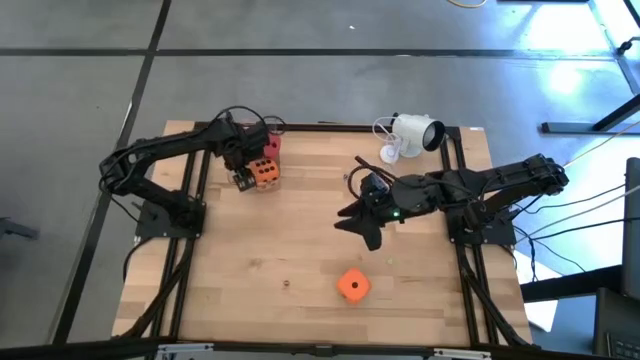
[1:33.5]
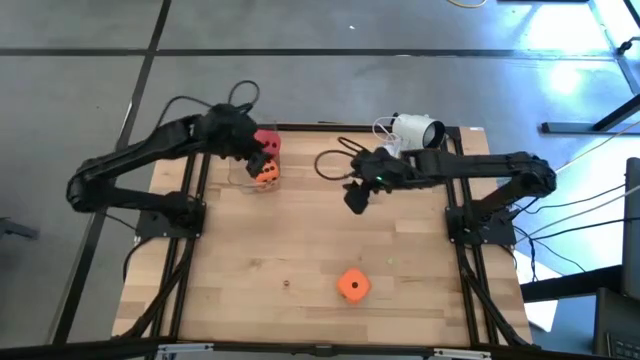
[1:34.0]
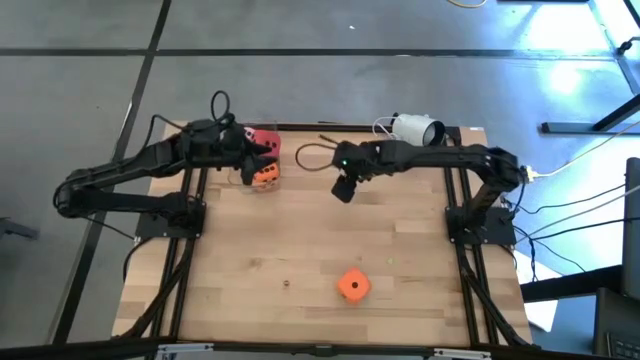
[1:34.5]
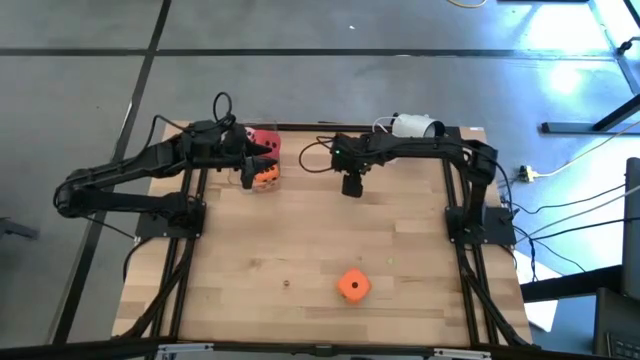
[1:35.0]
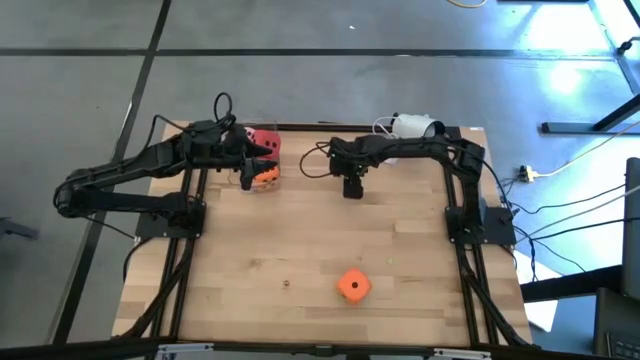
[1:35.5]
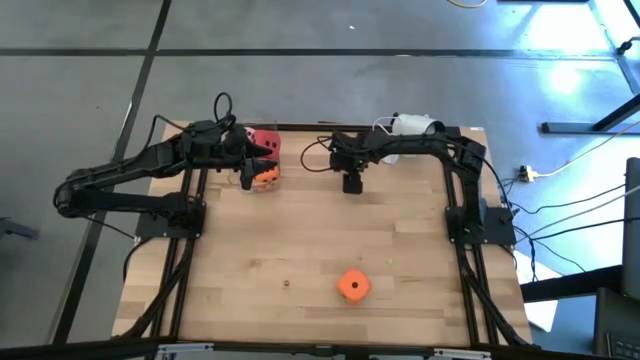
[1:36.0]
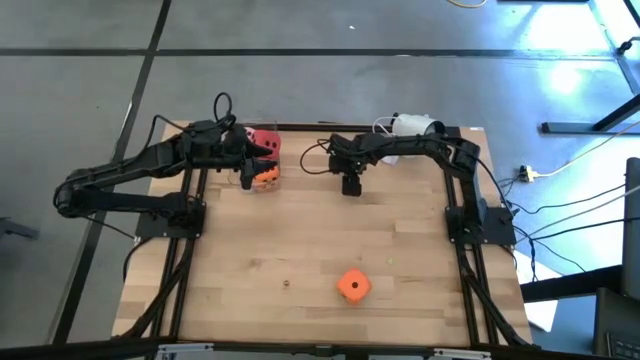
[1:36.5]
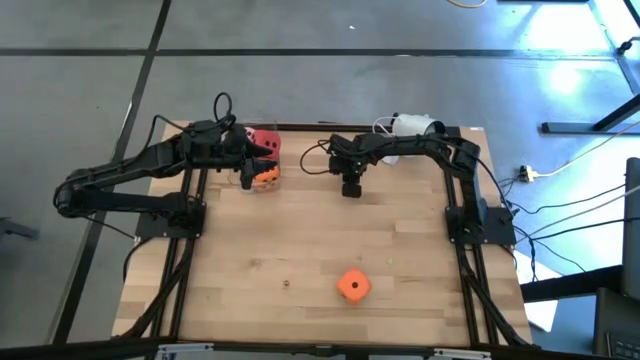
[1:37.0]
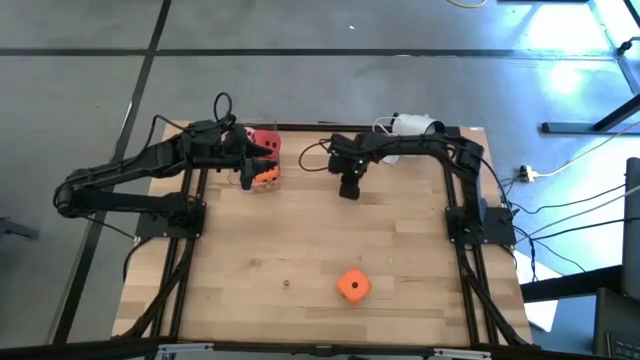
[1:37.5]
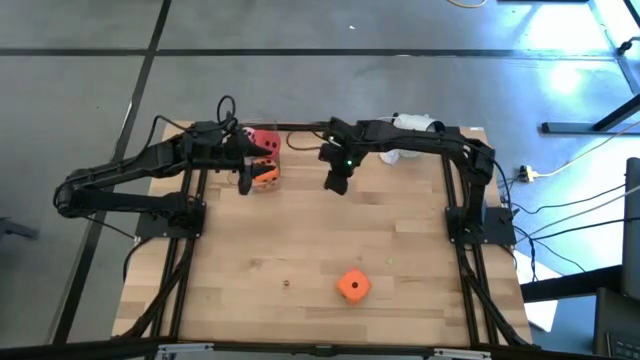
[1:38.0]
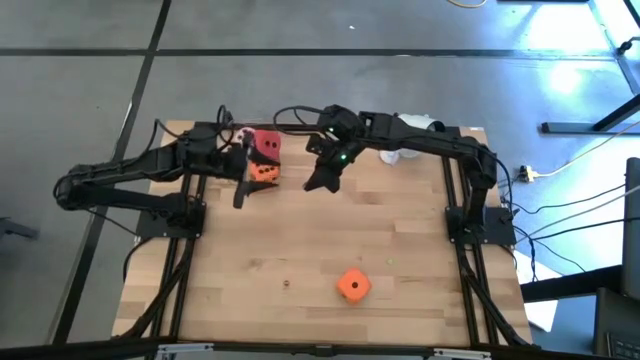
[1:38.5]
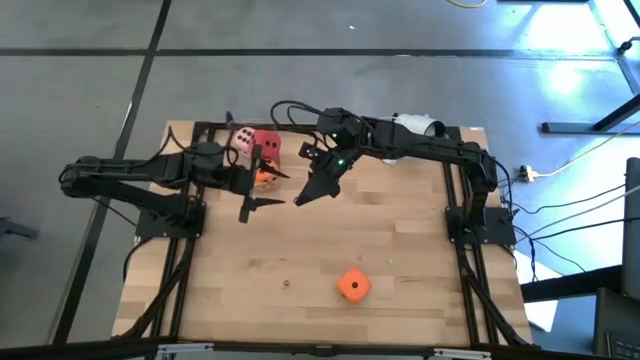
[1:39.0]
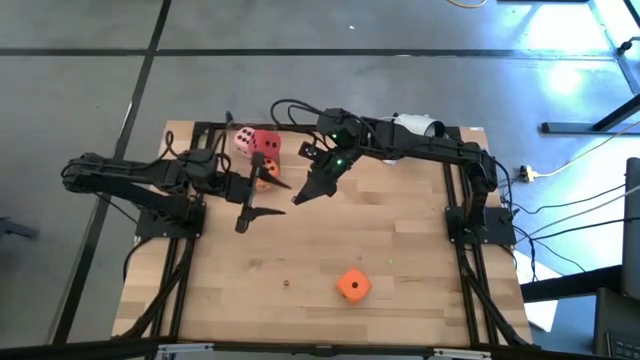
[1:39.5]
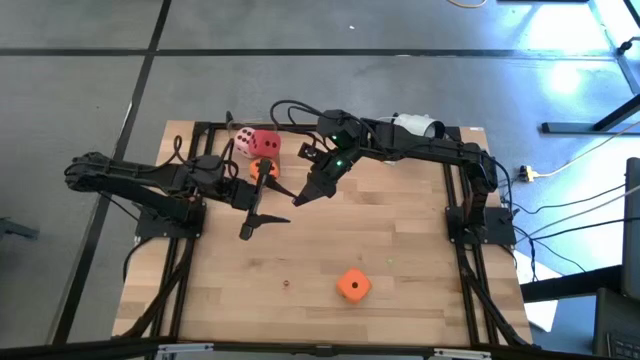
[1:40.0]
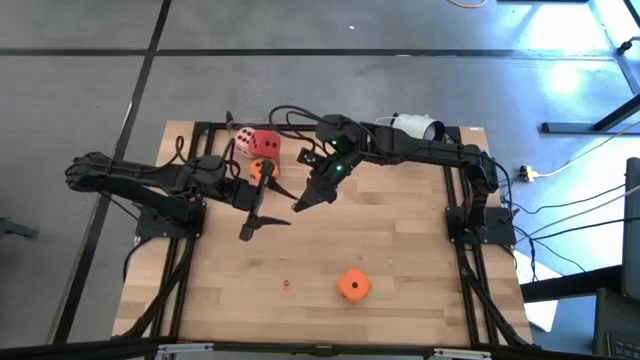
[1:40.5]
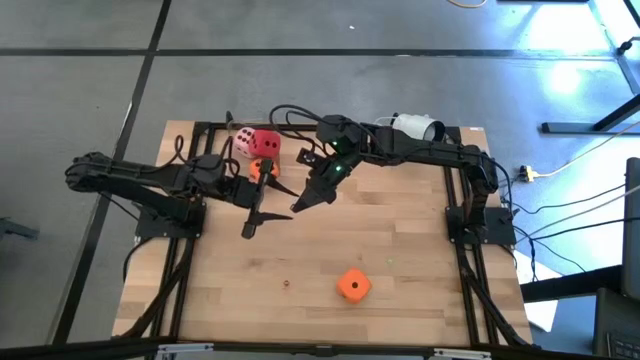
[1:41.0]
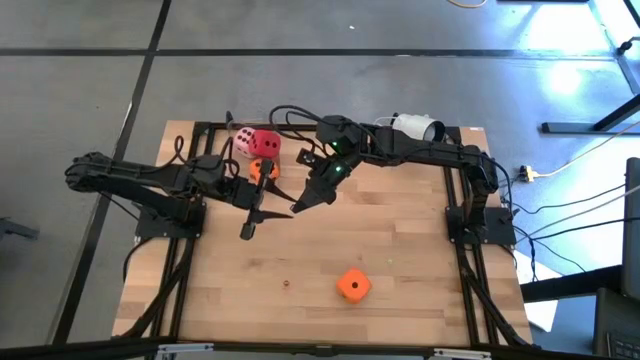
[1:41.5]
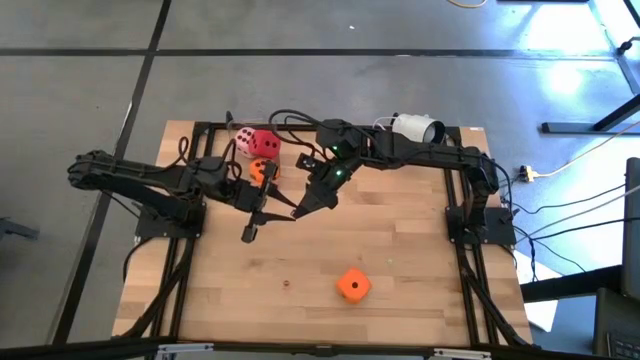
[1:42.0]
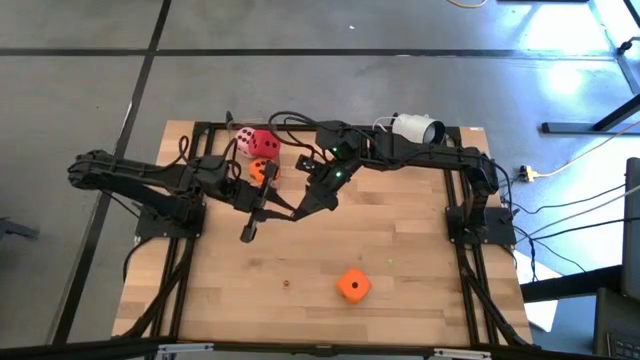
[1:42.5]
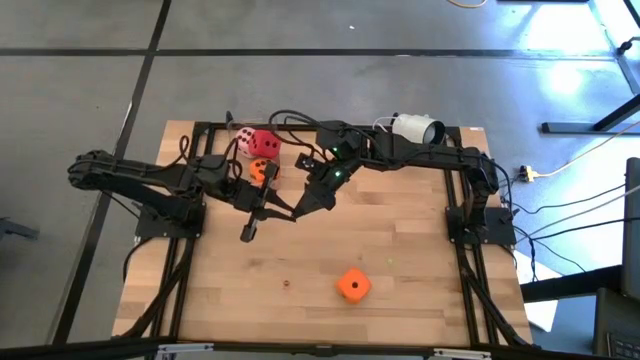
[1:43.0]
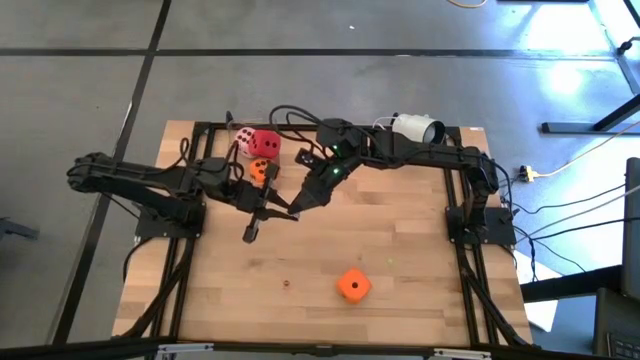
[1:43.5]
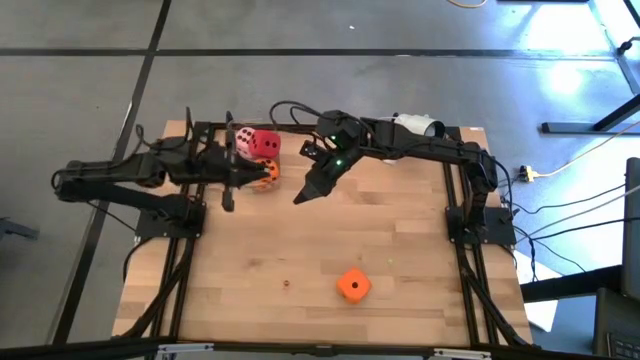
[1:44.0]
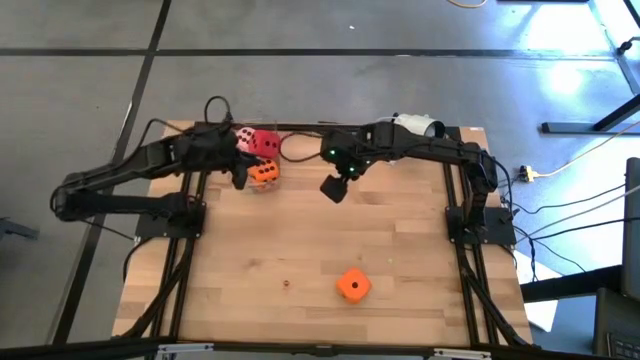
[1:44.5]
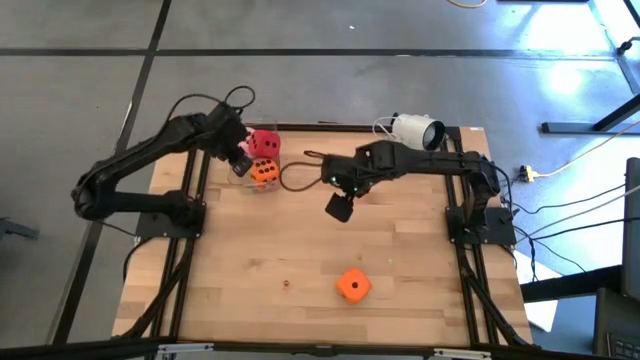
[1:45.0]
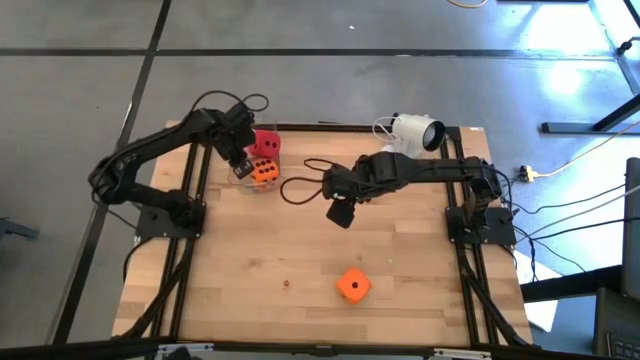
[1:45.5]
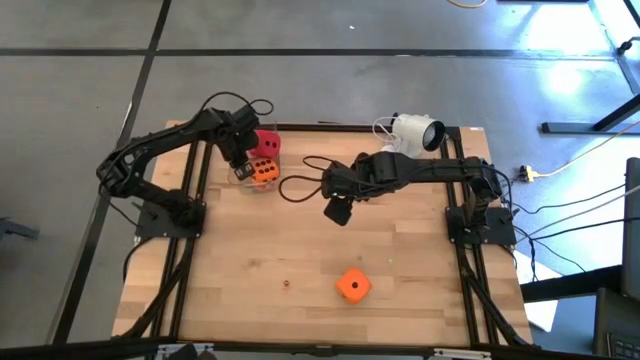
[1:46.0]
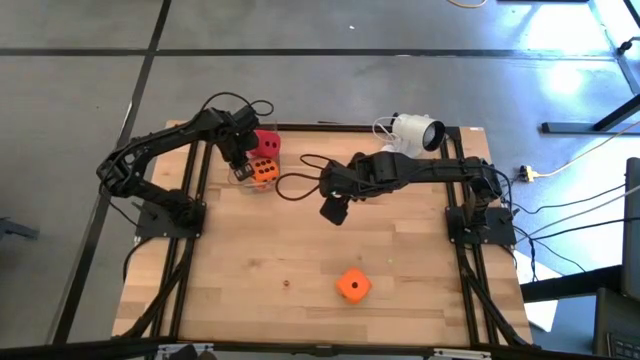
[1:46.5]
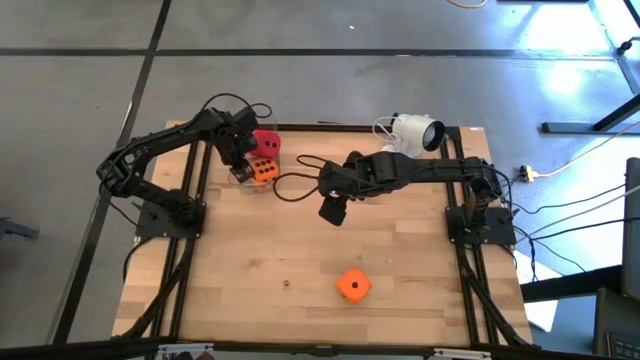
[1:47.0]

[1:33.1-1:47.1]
Task: Pick & Place Dice
Put the small blue dice into the transparent bin

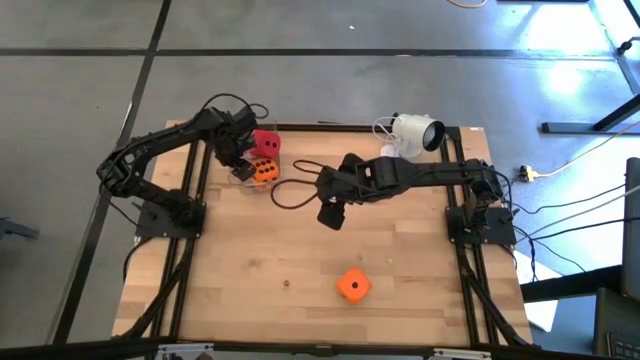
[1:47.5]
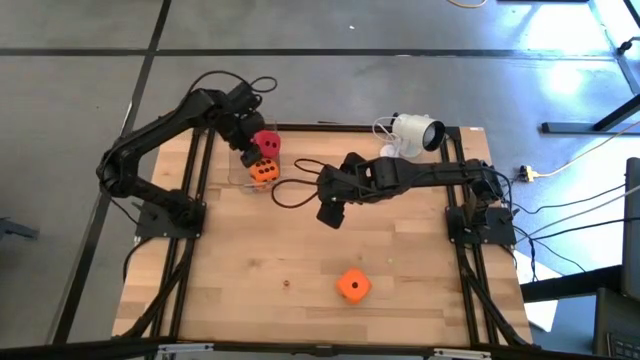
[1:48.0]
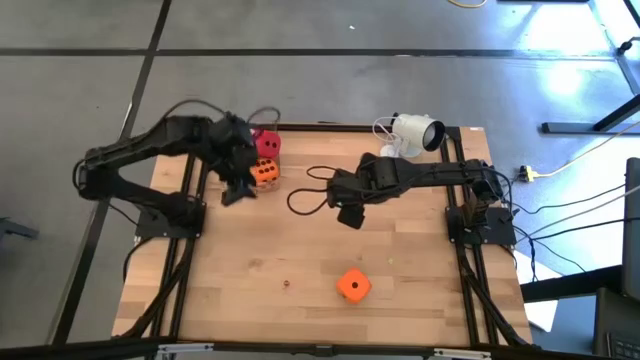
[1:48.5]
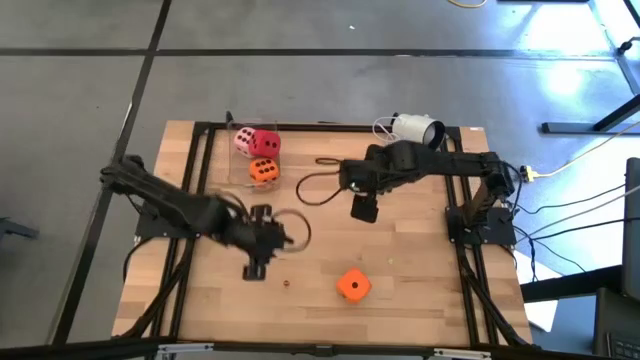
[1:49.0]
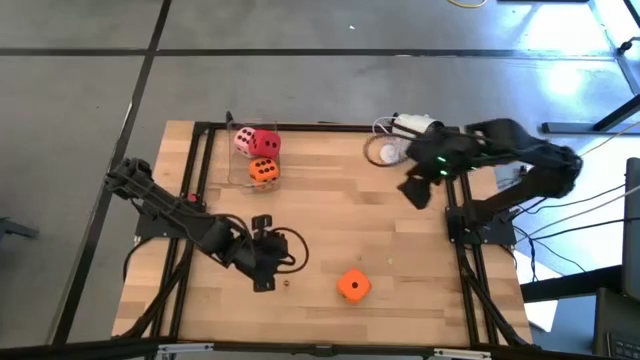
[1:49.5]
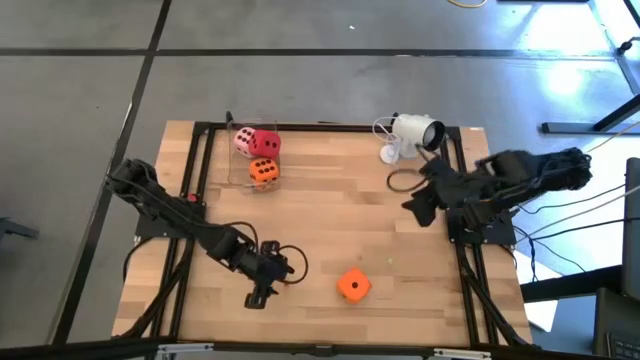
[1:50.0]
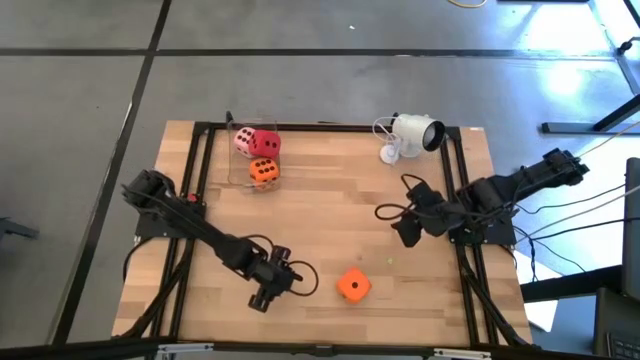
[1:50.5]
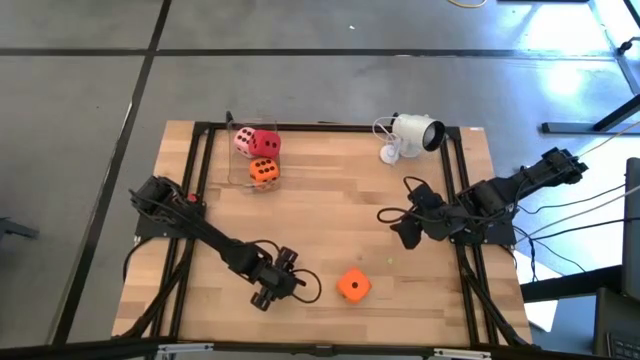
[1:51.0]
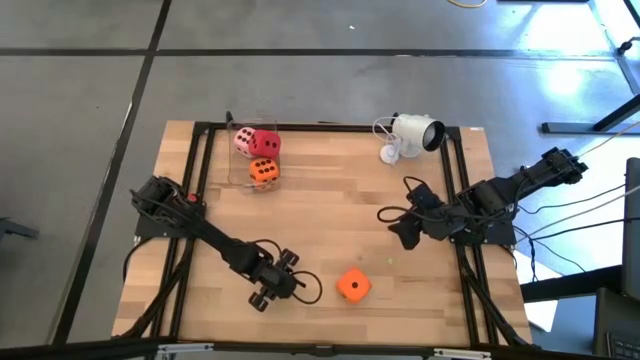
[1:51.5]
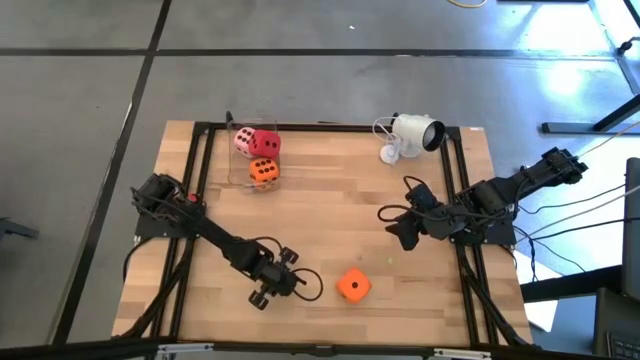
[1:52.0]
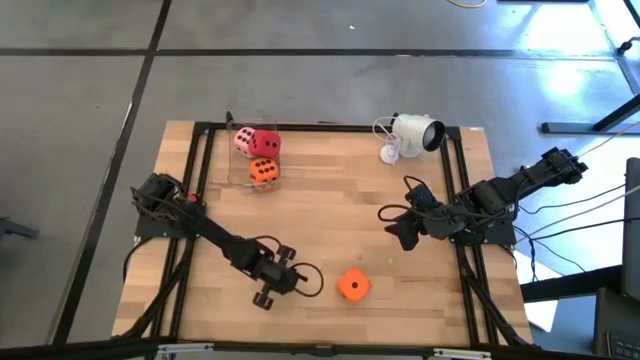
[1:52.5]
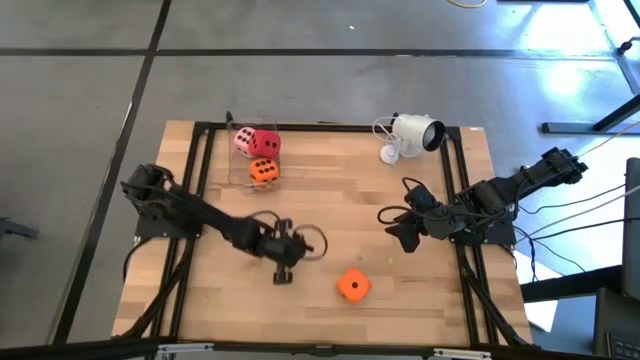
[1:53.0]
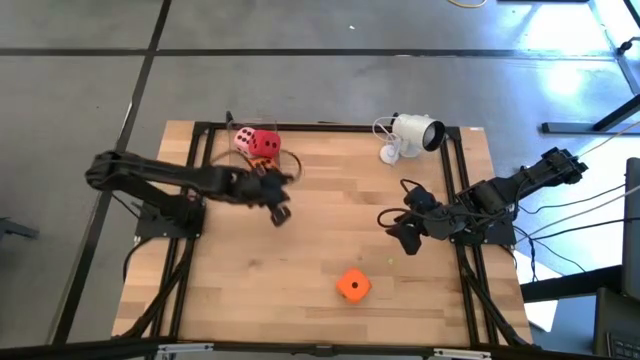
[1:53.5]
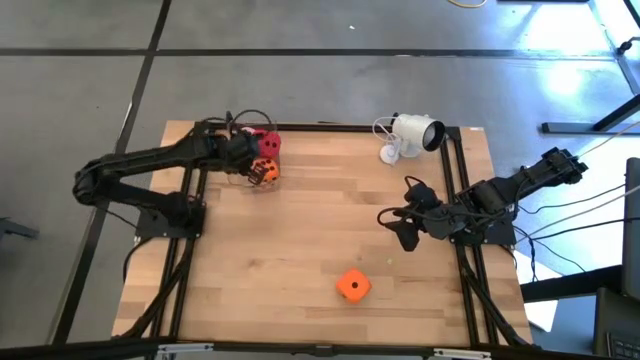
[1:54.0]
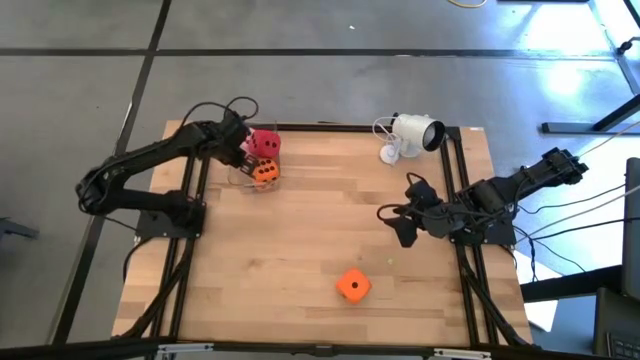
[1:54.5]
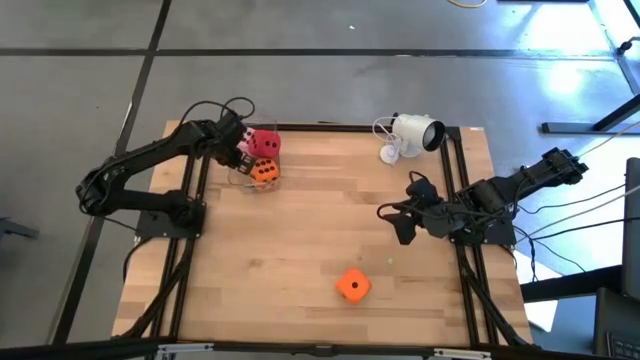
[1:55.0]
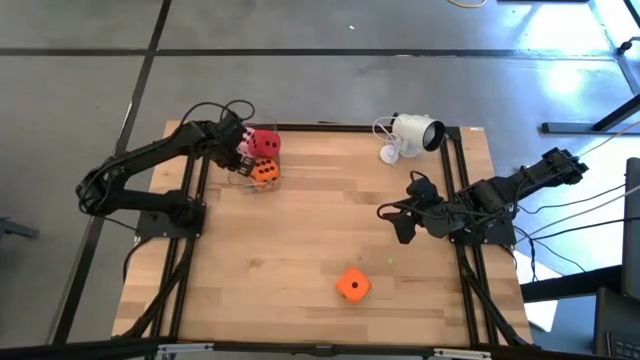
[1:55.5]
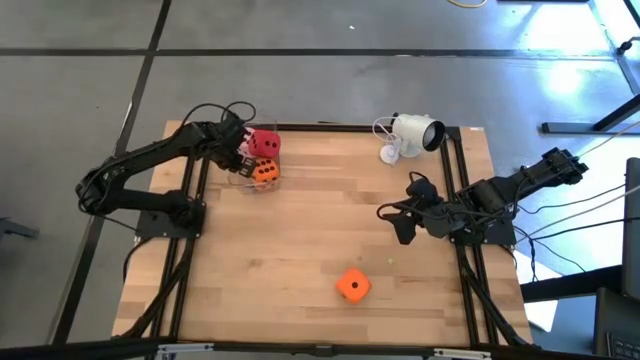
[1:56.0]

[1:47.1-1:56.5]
Put the small red dice into the transparent bin
